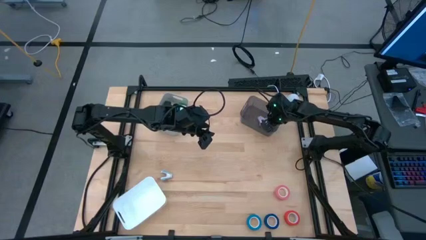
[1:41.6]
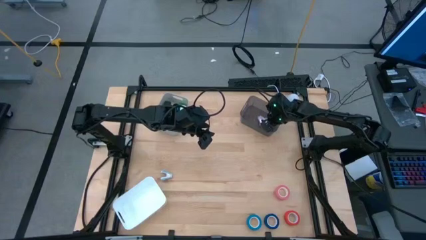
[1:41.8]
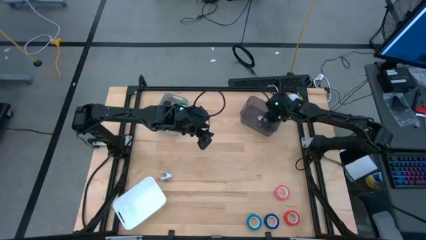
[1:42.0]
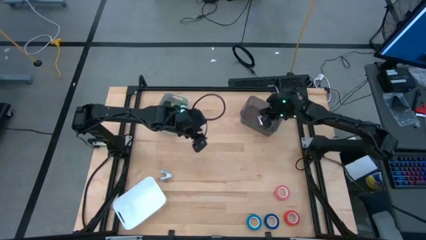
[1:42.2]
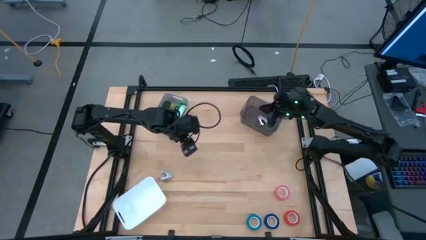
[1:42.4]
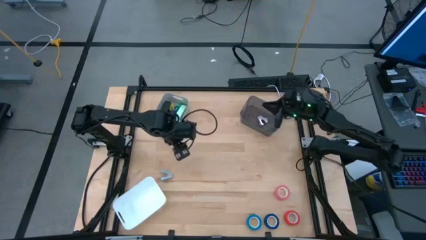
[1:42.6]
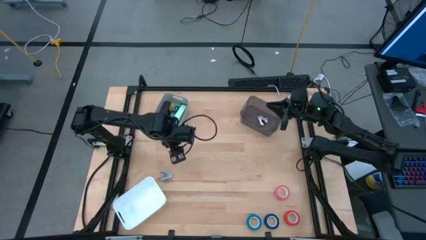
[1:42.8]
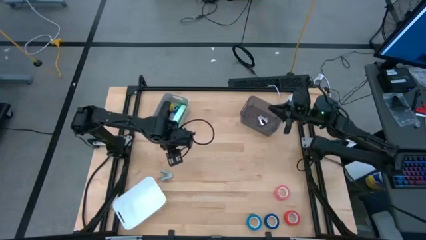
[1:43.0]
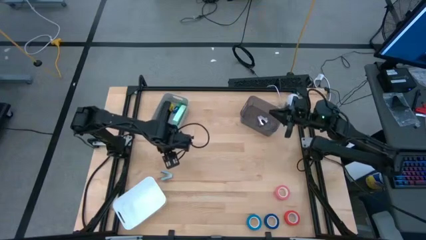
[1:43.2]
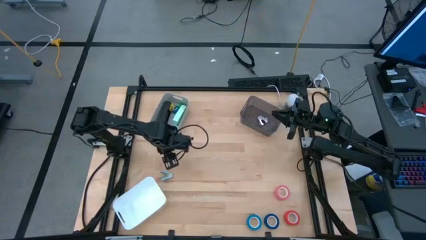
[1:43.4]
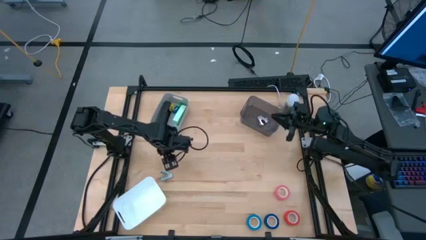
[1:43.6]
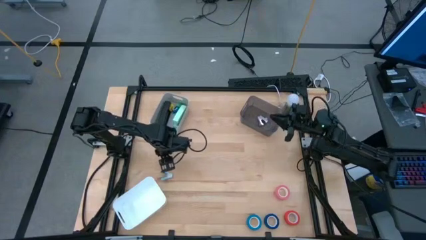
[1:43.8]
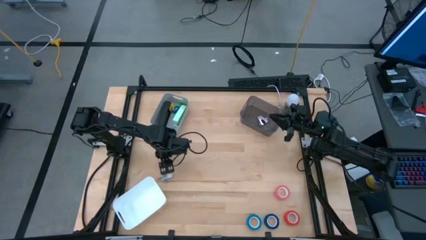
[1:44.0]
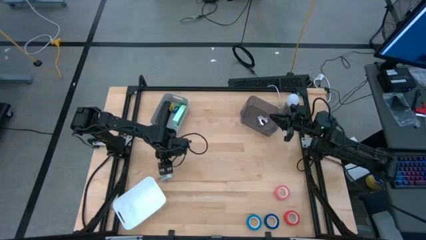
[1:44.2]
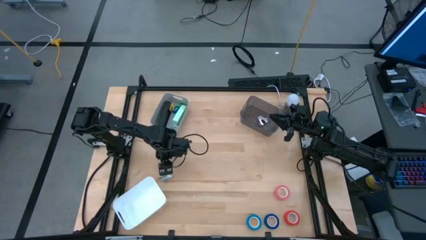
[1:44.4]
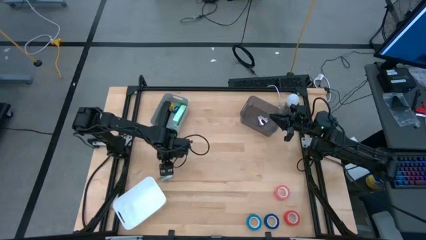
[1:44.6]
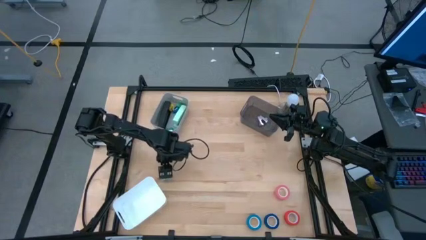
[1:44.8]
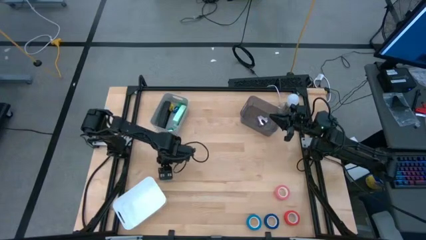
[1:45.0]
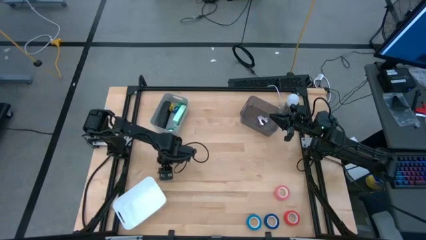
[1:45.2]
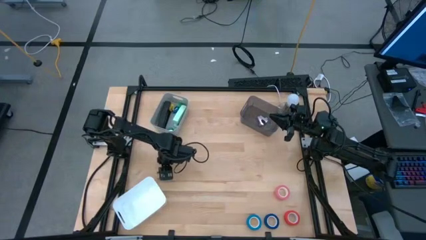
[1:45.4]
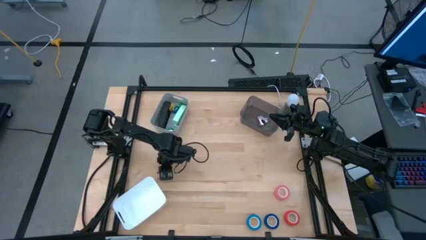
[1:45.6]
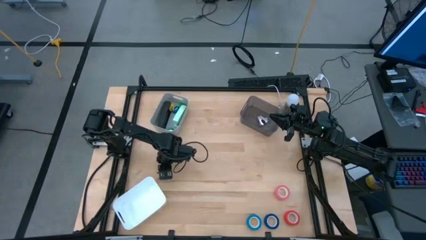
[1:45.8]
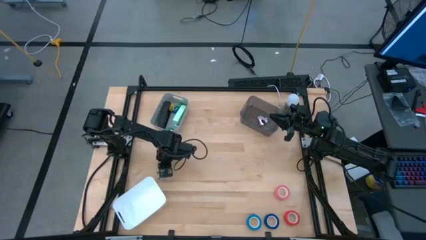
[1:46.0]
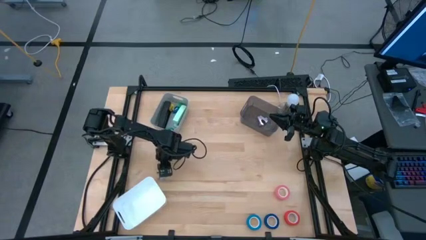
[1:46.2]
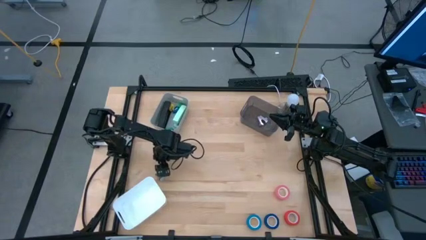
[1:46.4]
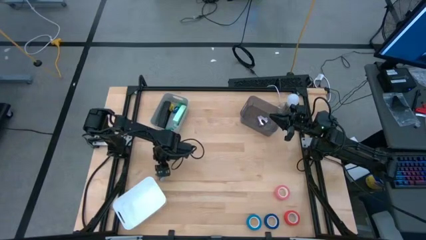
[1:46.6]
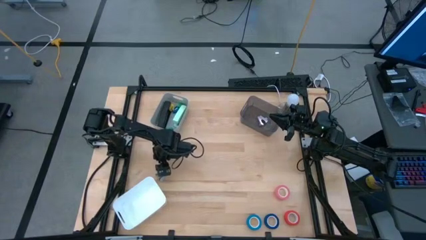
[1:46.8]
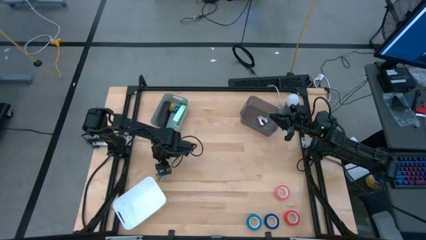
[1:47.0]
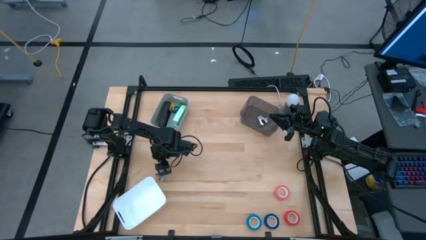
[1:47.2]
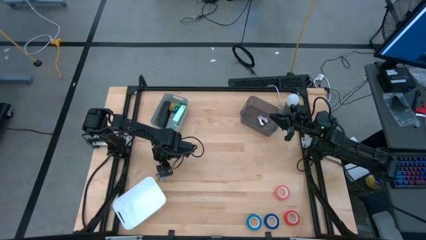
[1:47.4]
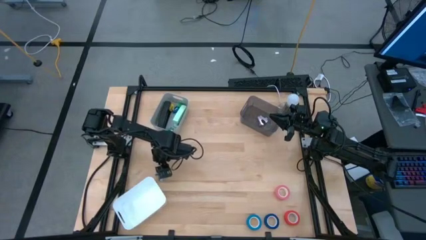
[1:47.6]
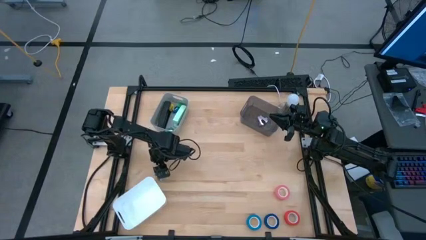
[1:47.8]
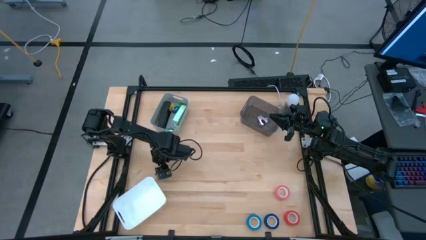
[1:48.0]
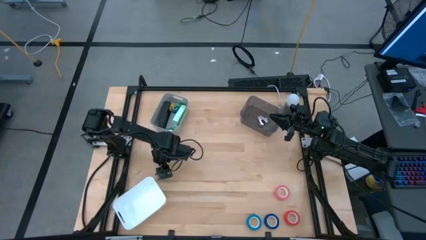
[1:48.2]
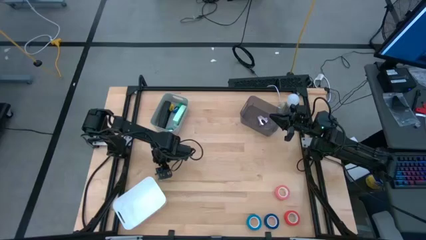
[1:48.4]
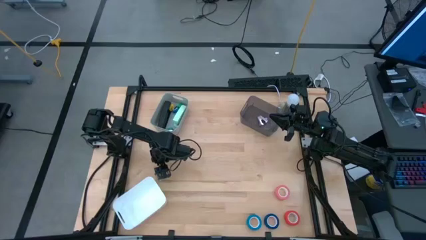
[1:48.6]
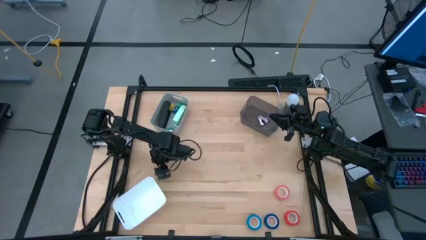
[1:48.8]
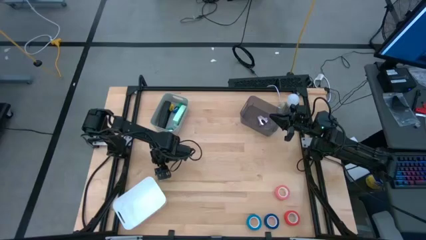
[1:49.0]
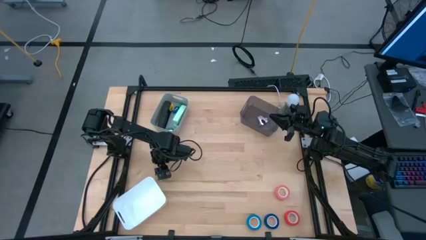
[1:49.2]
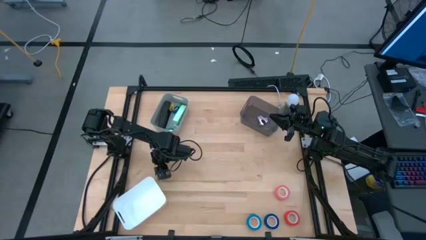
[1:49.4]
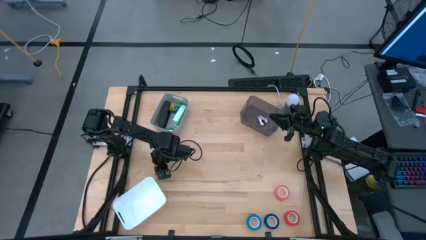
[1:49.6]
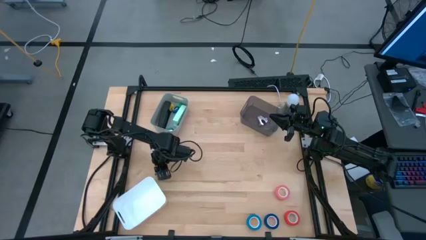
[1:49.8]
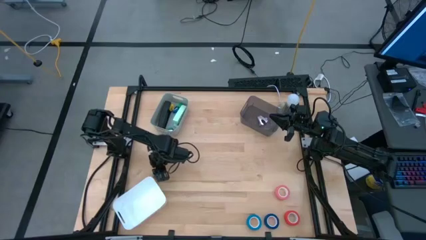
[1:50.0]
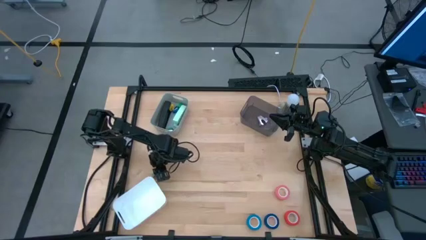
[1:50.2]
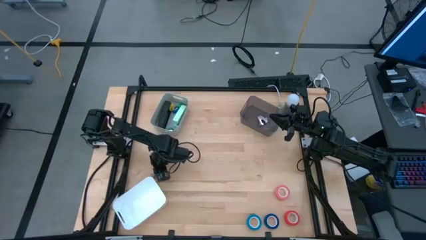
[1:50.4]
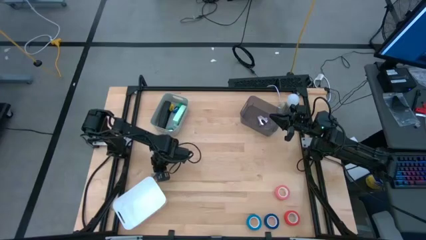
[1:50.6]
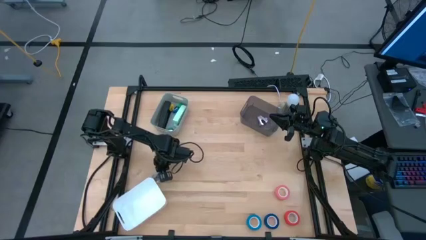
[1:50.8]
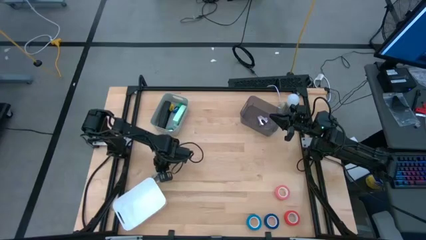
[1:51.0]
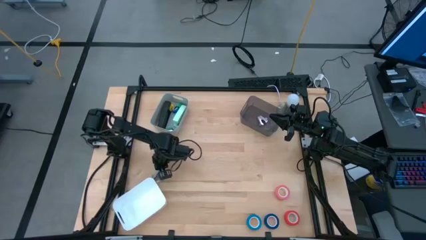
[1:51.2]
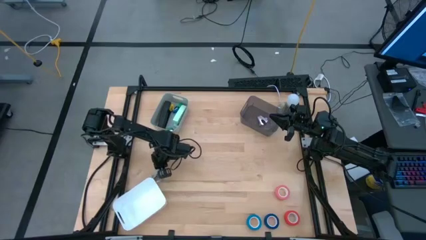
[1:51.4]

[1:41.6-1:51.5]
Task: Pick and place Stapler, Stapler remover, tape
Put the blue staple remover into the black bin

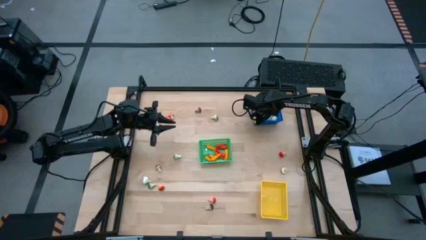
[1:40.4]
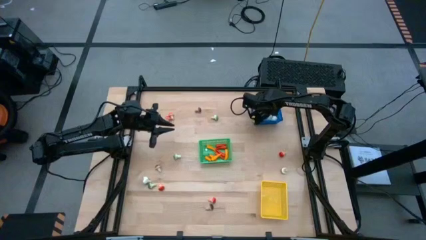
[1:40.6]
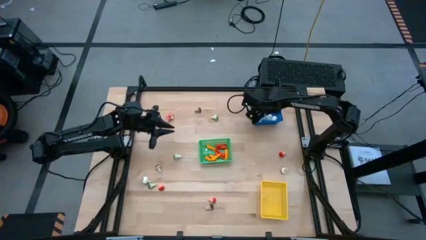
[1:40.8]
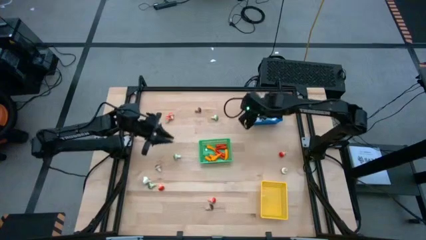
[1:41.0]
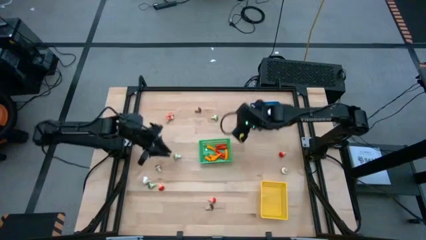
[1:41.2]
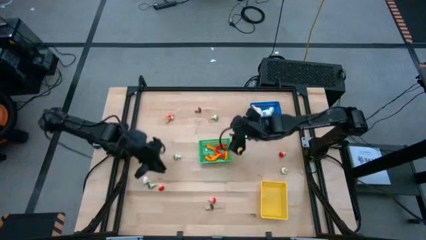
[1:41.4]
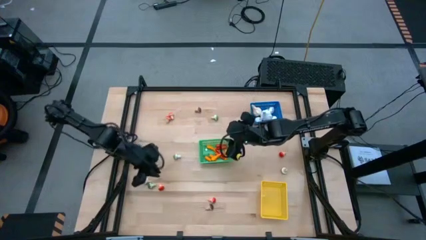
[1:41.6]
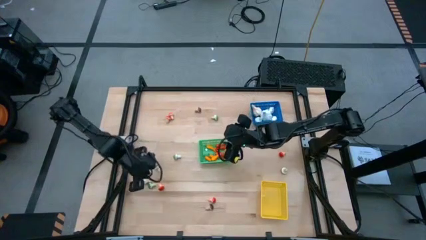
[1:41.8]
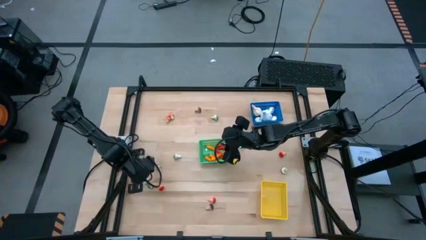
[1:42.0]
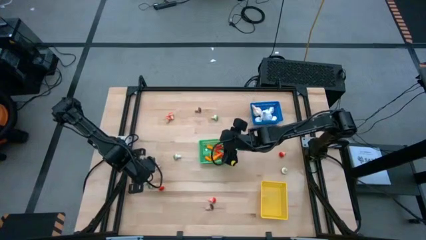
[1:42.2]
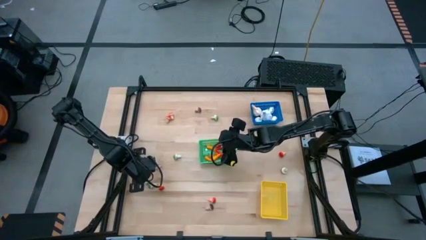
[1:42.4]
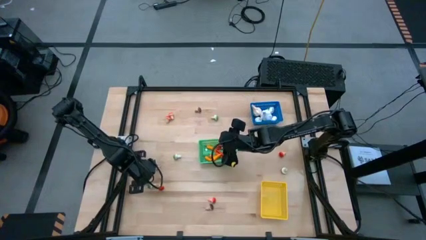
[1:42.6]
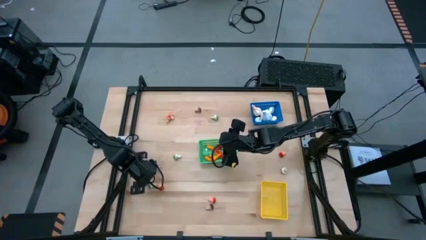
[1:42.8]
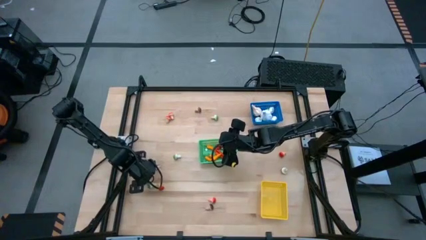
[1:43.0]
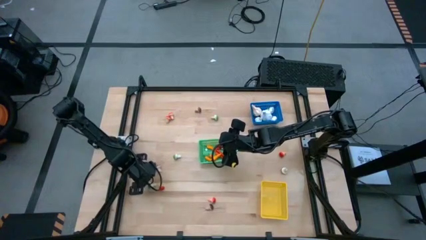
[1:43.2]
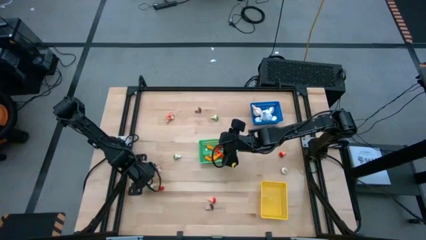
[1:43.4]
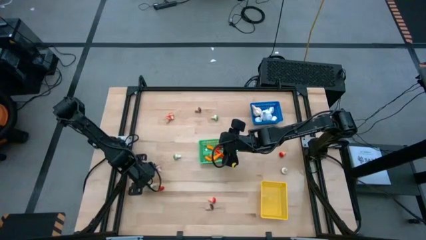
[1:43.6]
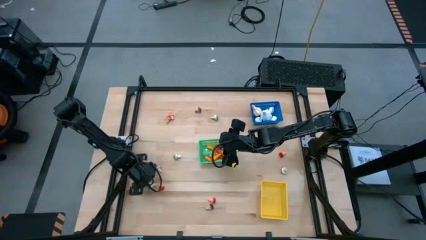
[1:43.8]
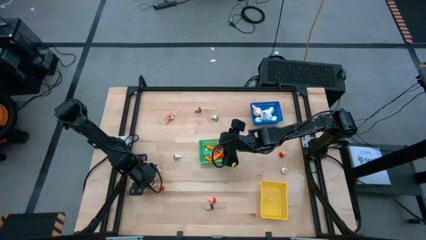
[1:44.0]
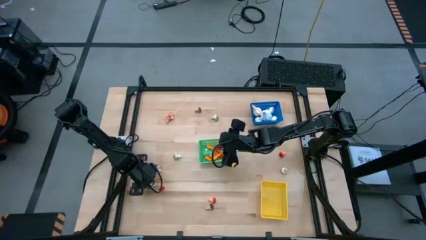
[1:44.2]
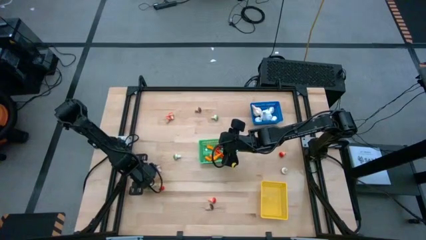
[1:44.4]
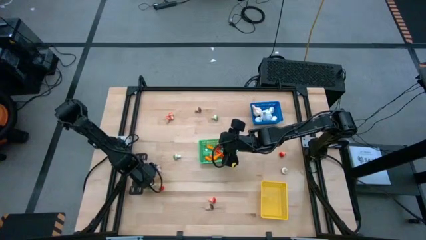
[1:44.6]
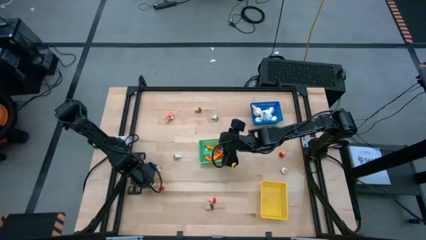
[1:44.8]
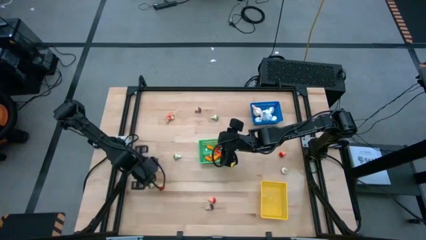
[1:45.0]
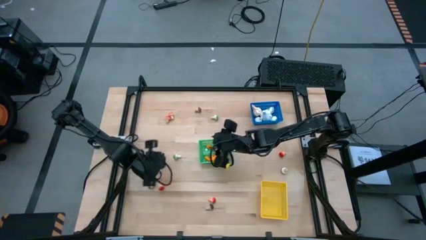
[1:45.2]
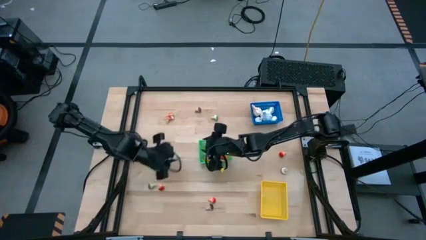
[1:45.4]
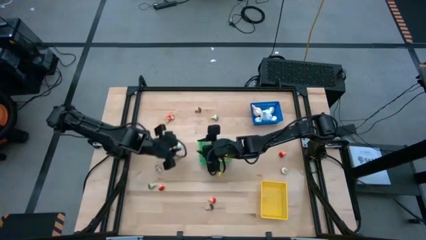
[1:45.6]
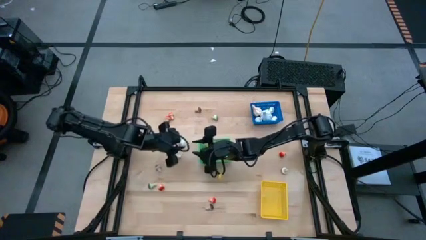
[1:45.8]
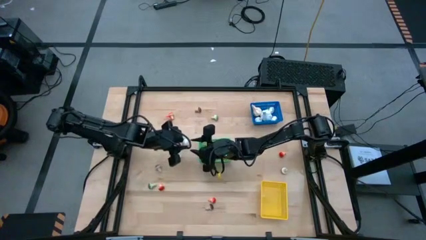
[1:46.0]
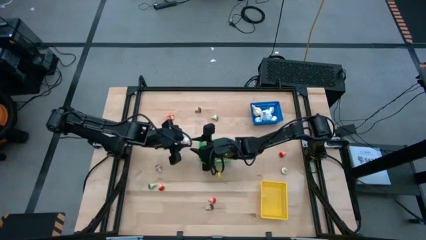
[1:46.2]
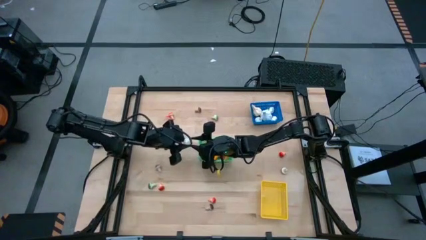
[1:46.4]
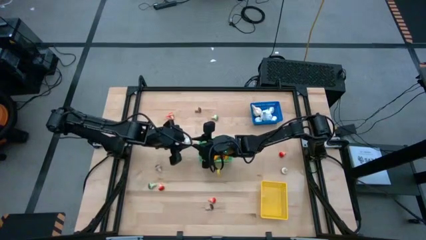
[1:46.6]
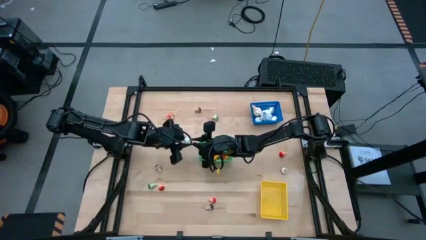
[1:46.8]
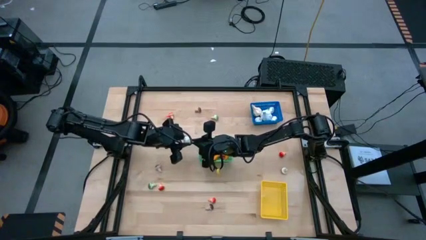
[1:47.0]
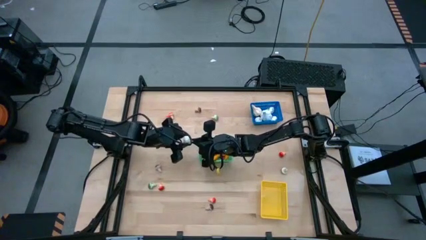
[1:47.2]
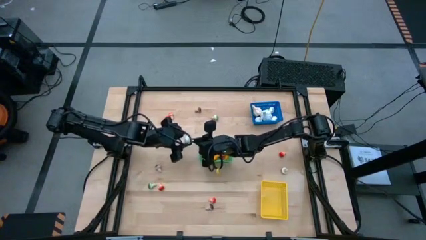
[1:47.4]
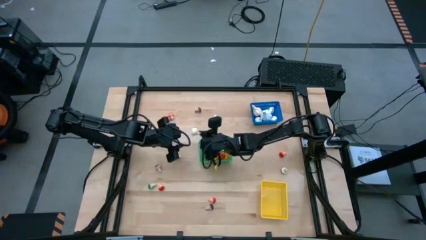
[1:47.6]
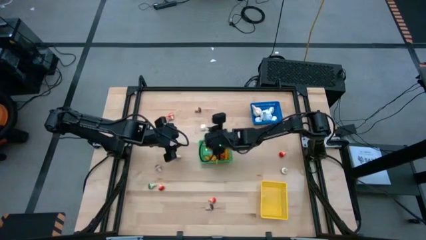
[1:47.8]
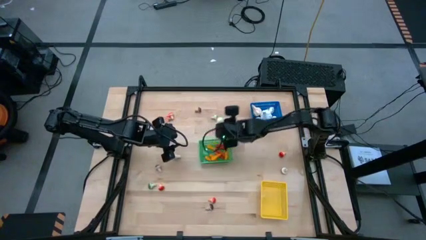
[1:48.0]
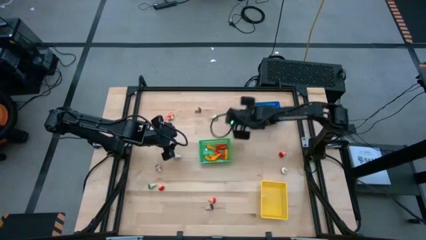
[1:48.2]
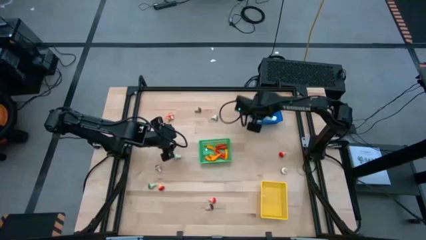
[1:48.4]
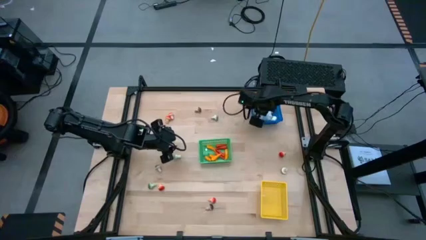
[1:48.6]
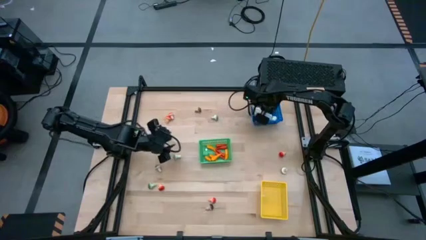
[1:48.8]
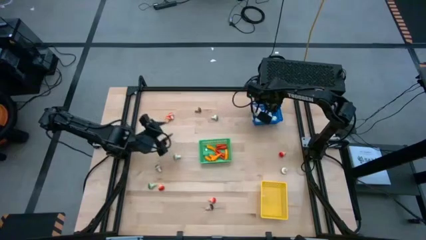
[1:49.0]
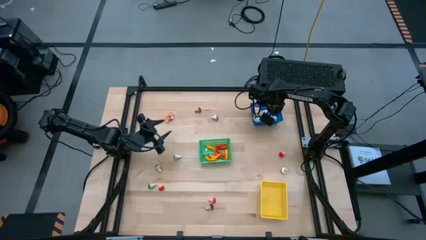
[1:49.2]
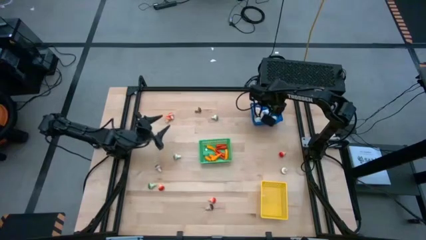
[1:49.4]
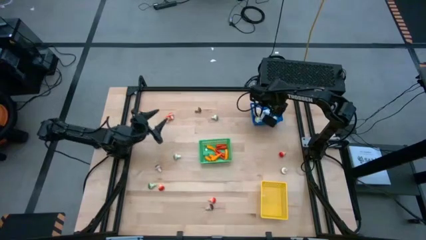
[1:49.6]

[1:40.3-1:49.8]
Task: Sort produce into baskets
Put the garlic into the blue bin
